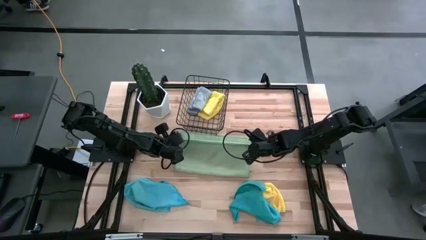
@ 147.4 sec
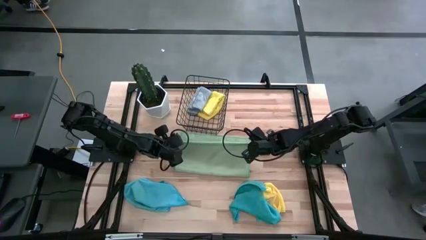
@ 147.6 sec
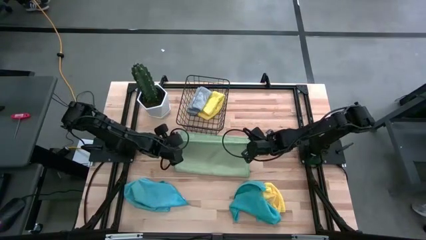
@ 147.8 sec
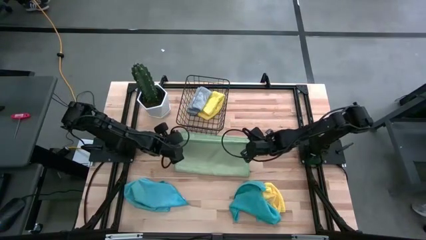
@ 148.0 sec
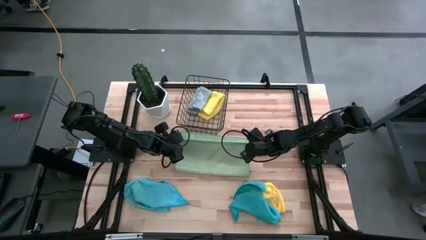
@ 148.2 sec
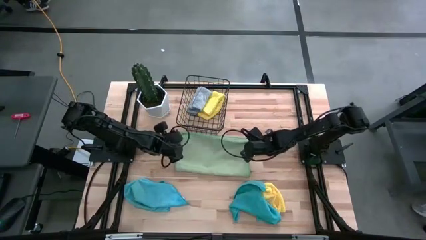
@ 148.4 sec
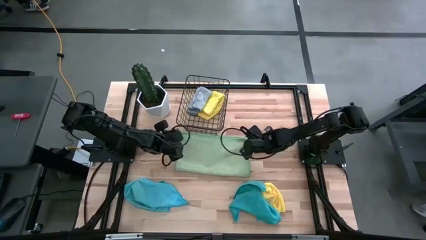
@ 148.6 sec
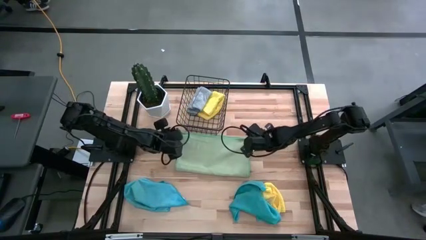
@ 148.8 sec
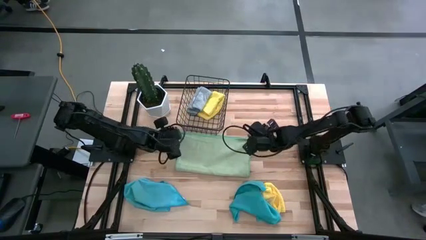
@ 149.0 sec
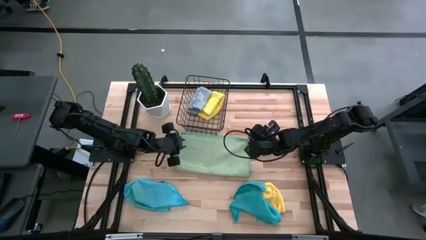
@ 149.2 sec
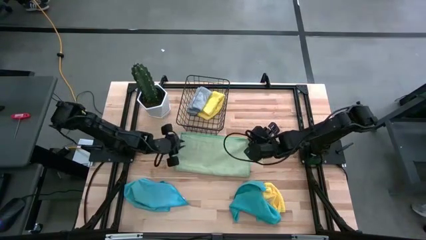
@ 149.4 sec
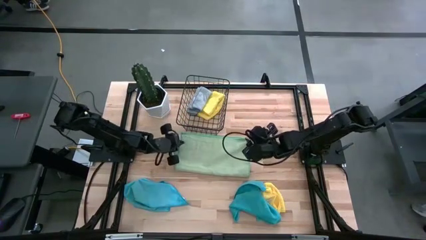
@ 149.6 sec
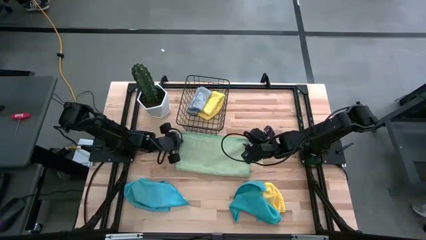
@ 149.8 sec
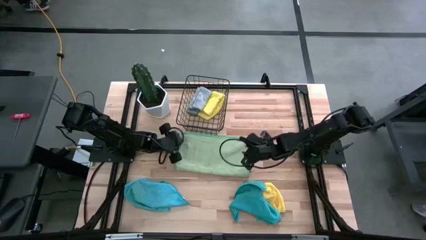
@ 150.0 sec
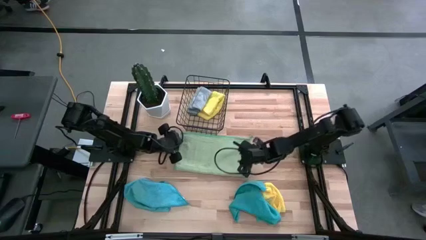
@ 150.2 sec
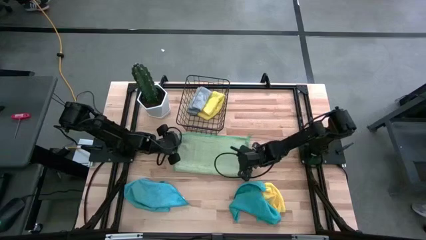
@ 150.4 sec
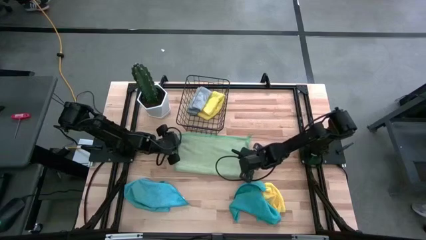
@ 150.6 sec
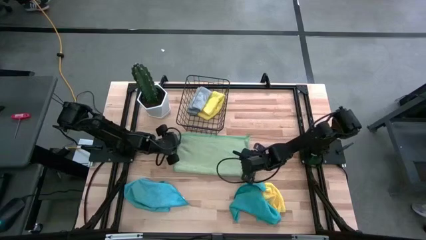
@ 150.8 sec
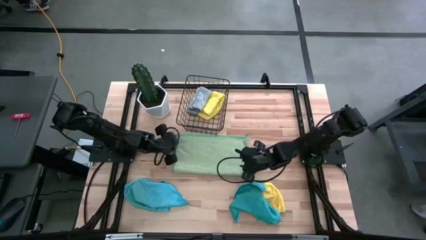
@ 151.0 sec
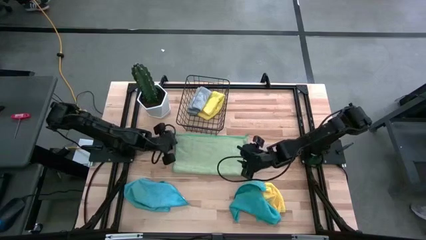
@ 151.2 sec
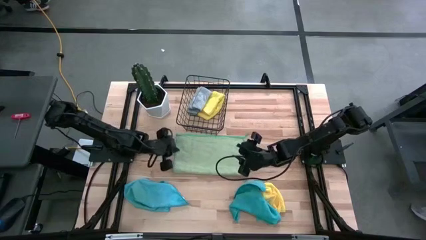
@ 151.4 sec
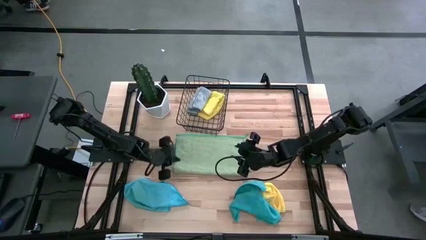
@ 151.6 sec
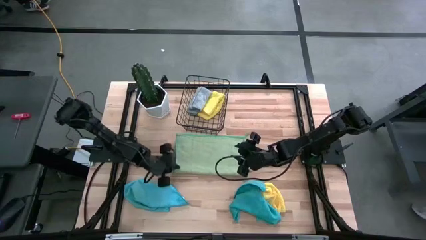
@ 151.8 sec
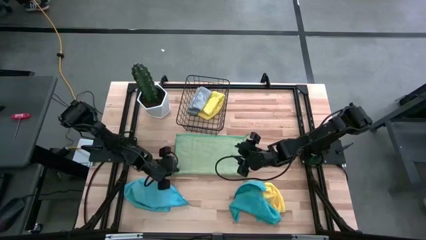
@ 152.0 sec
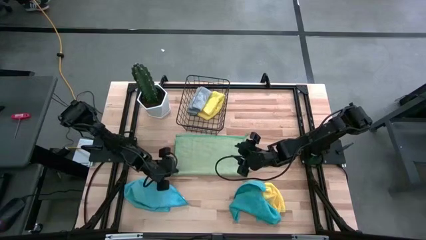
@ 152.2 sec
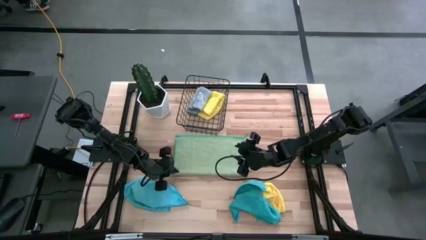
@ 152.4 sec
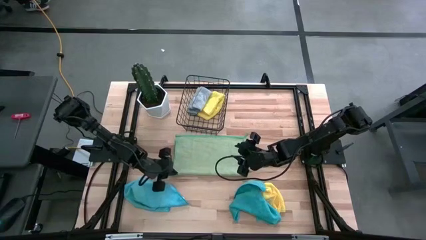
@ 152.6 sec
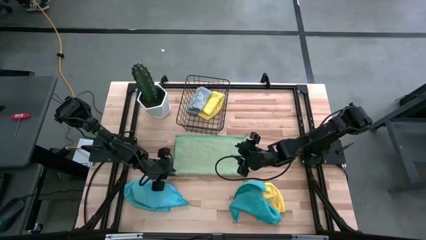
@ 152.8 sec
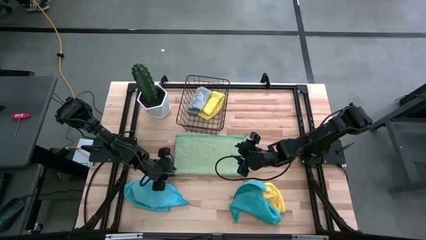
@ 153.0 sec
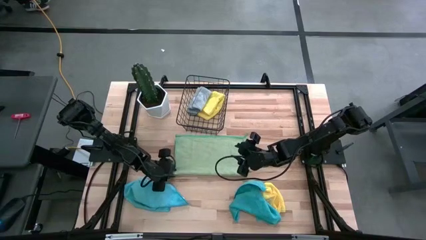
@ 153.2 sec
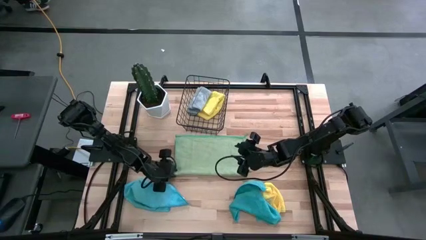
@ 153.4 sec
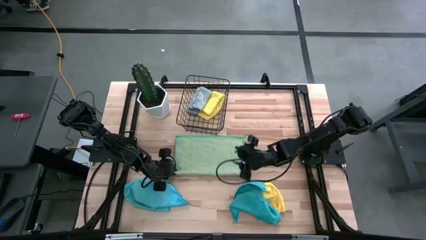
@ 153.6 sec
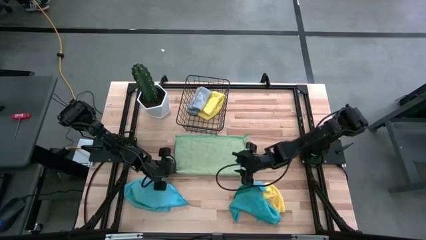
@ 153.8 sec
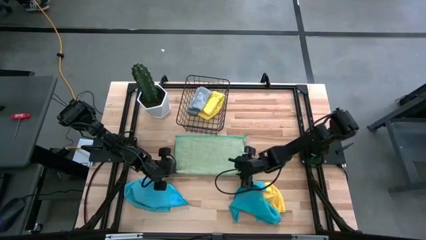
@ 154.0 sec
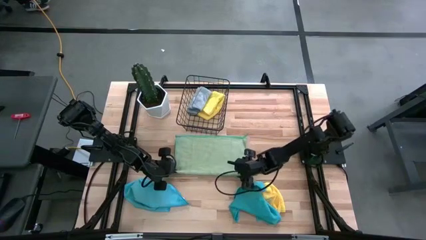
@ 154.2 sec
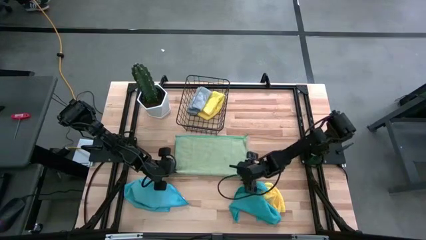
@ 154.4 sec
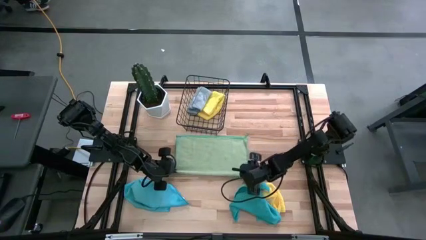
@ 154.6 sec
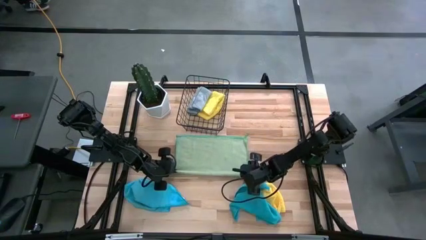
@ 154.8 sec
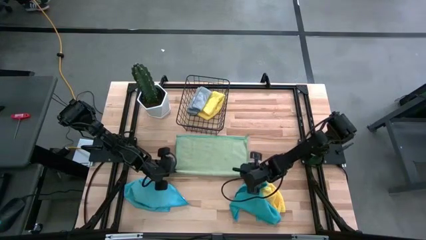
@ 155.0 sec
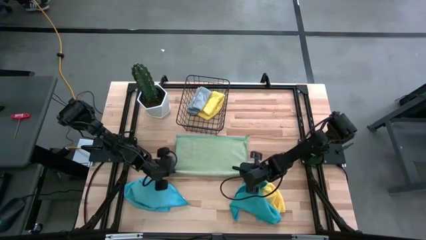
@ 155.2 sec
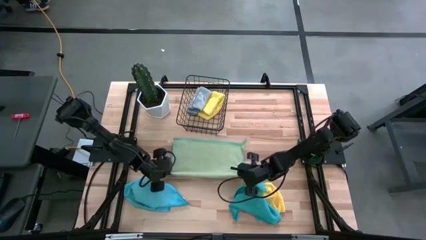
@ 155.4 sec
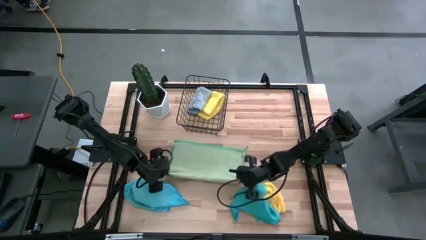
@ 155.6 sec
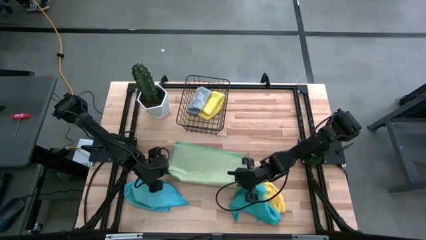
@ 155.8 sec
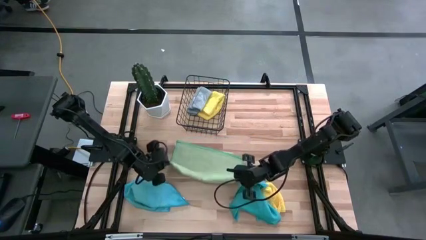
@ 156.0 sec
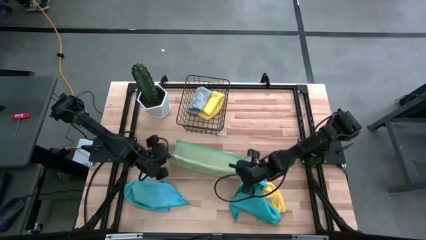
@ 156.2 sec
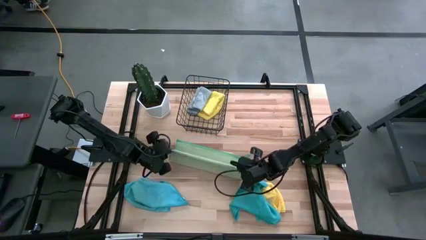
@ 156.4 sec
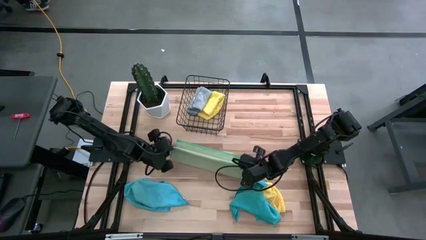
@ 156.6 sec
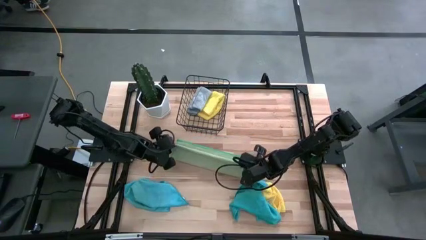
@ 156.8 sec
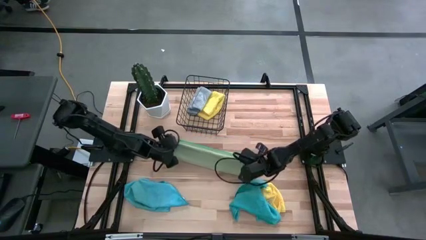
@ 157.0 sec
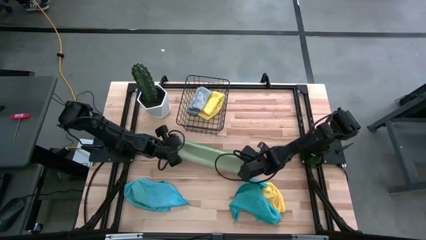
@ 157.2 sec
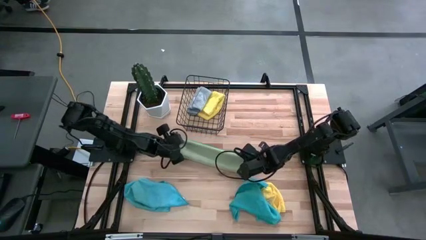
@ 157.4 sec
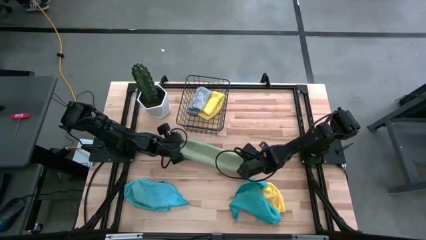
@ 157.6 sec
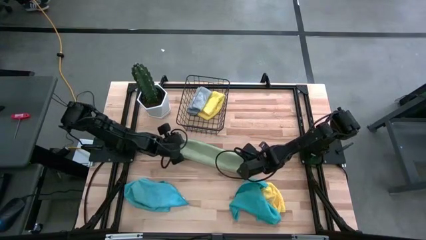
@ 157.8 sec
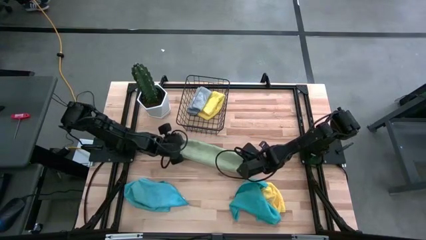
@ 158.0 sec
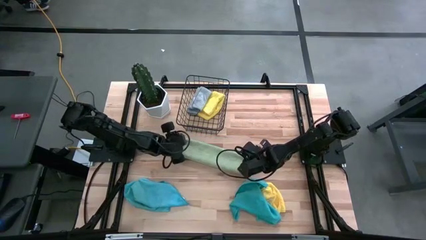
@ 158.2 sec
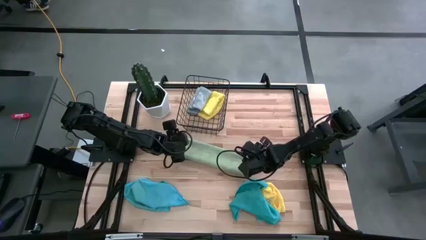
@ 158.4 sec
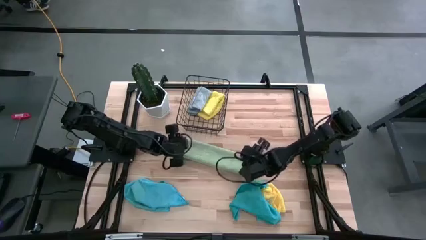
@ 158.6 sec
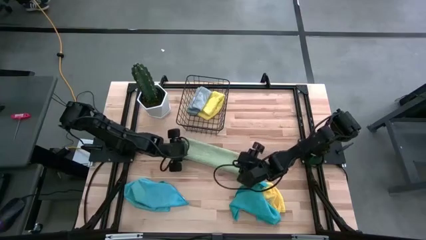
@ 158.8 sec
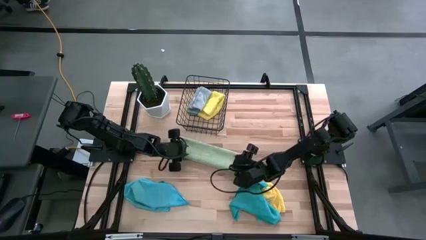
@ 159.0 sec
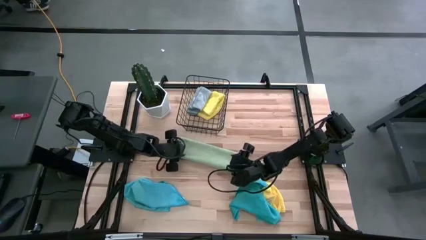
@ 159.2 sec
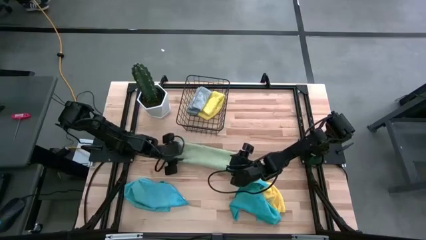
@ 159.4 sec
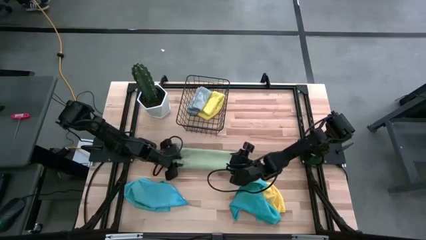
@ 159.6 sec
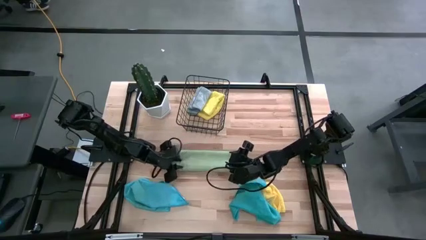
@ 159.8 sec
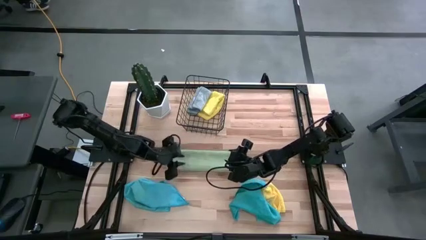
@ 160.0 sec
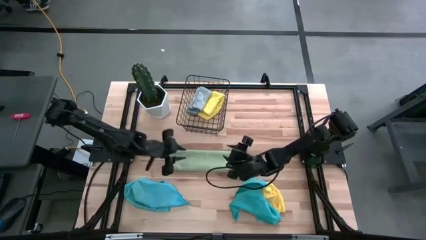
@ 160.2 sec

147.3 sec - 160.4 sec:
Task: Fold microfiber towels
Fold the green microfiber cloth

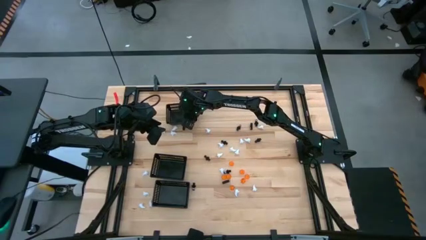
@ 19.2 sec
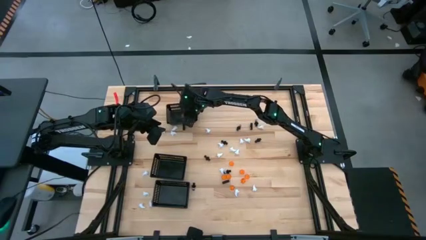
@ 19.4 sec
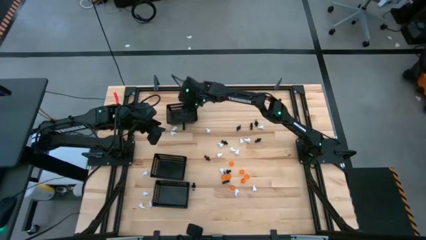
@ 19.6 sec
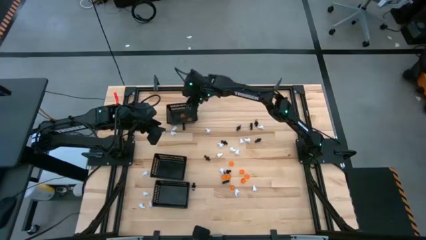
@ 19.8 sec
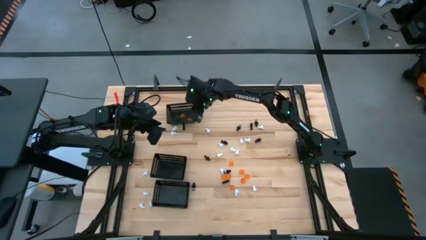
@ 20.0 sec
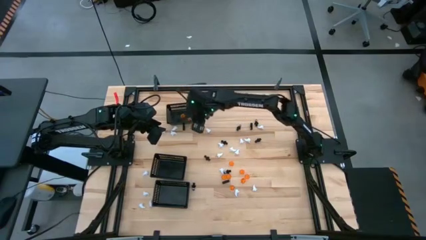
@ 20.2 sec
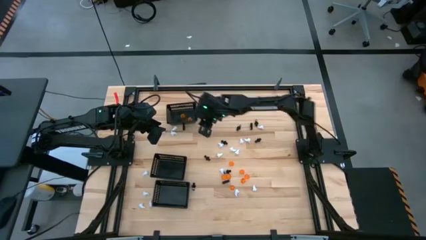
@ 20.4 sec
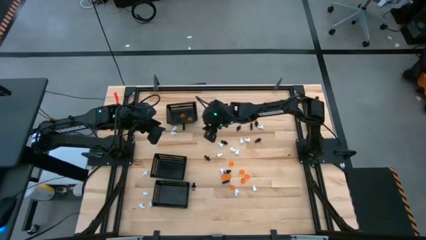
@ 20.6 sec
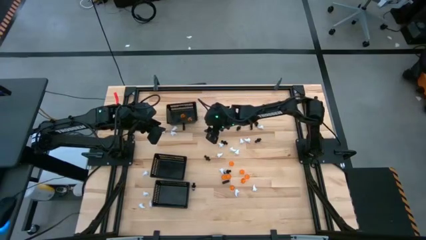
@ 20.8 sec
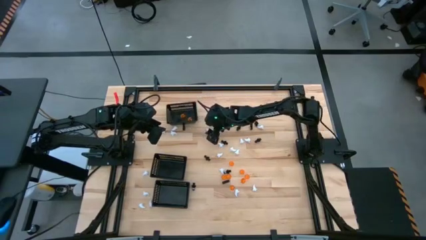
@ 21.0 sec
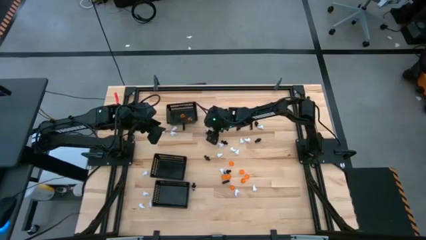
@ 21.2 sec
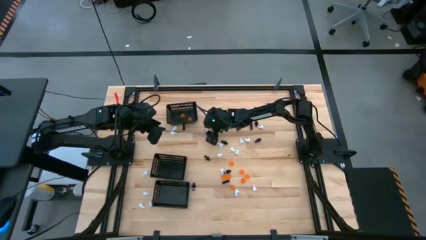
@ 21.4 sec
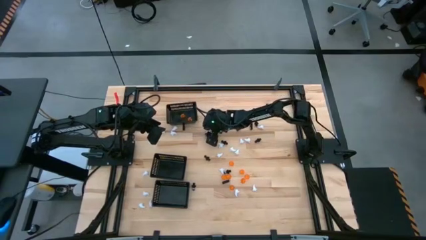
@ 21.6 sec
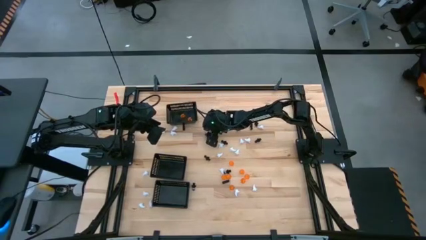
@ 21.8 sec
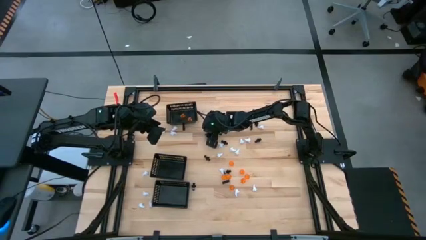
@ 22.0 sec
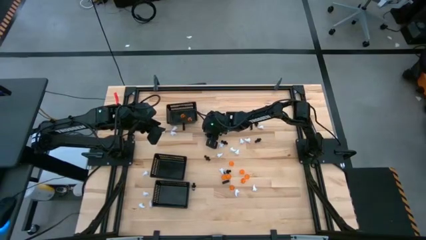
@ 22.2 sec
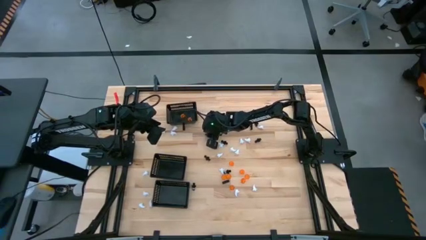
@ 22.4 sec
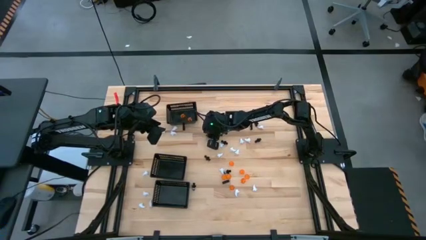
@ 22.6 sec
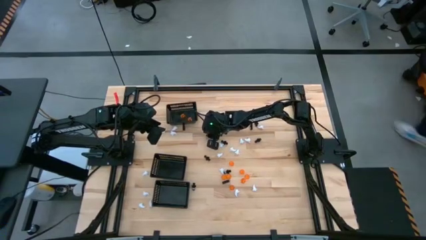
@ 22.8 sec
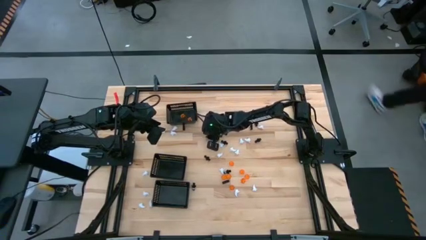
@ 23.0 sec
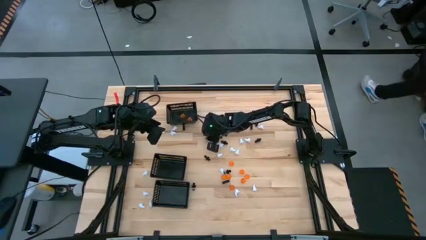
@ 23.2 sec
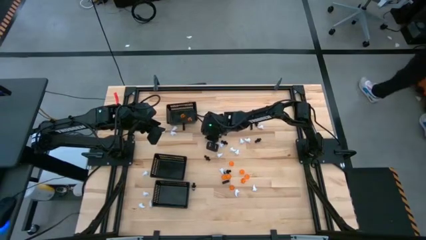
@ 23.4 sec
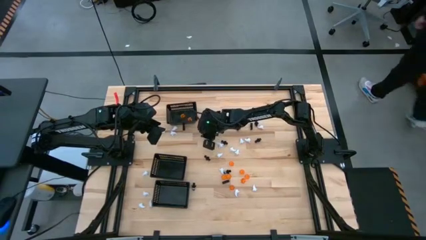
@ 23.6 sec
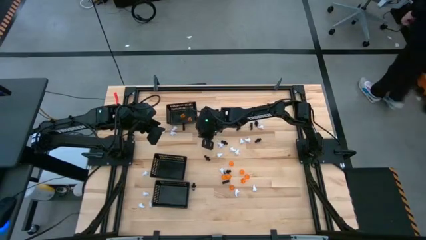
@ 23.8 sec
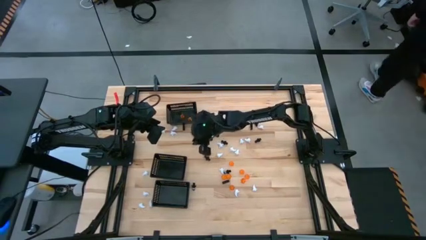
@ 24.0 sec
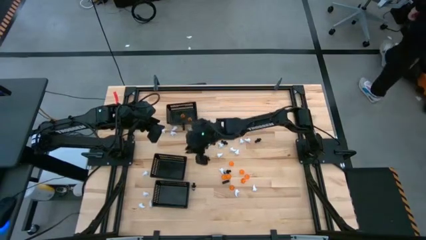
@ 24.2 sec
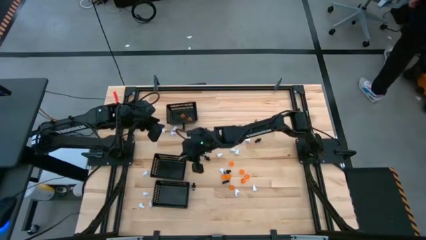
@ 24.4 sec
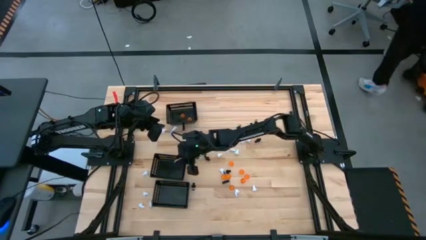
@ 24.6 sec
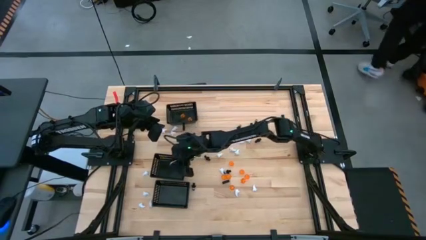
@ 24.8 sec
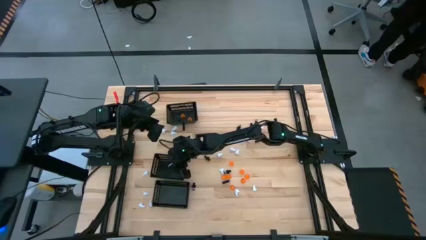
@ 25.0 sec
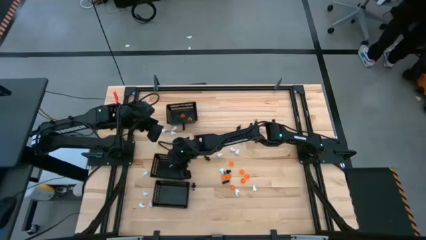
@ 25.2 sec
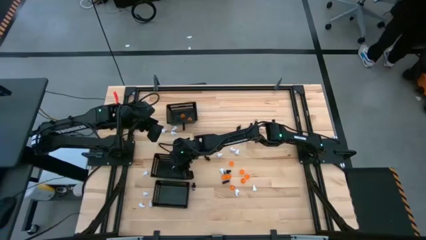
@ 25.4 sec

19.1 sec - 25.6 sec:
Task: Sort Halloween decoration
Put the white toy into the middle black bin
